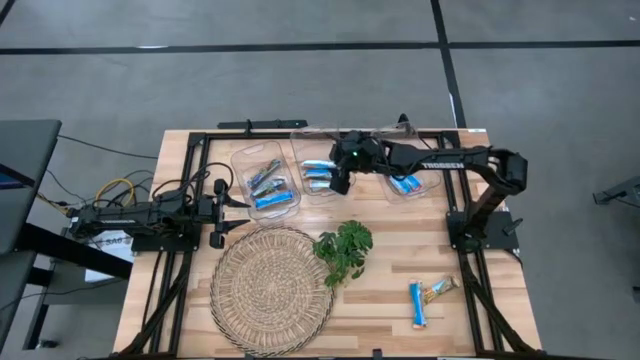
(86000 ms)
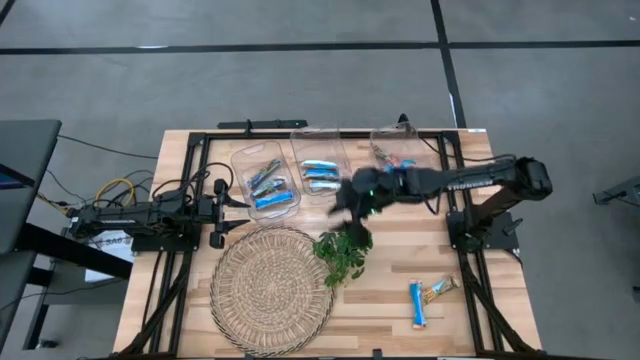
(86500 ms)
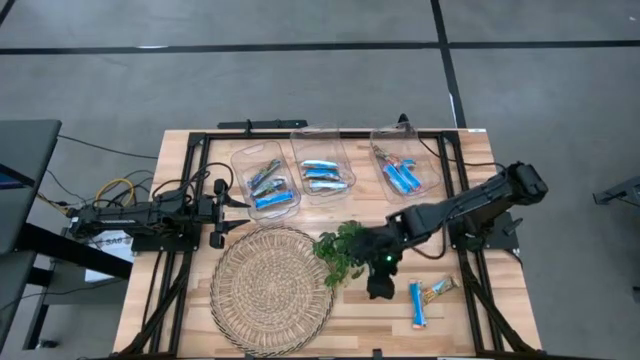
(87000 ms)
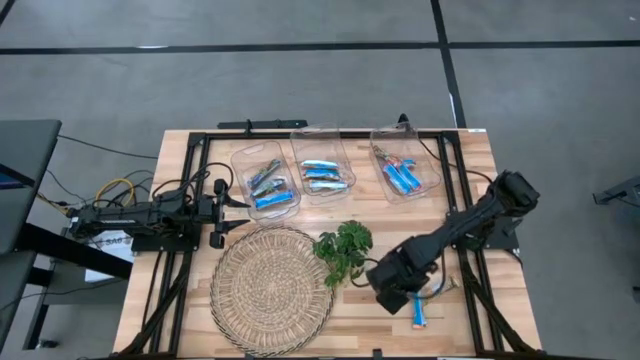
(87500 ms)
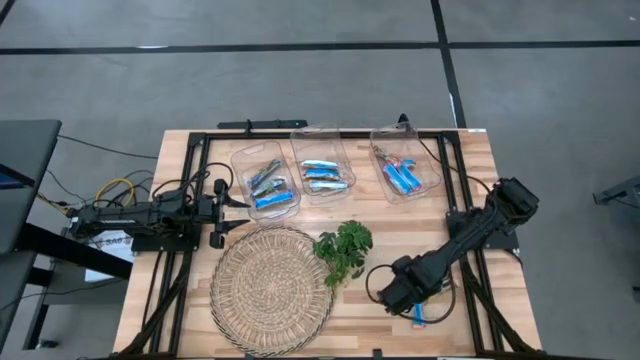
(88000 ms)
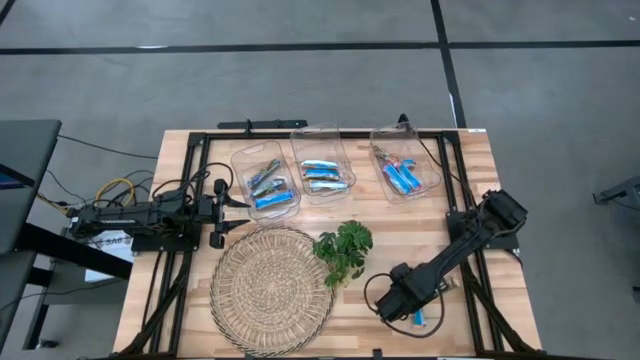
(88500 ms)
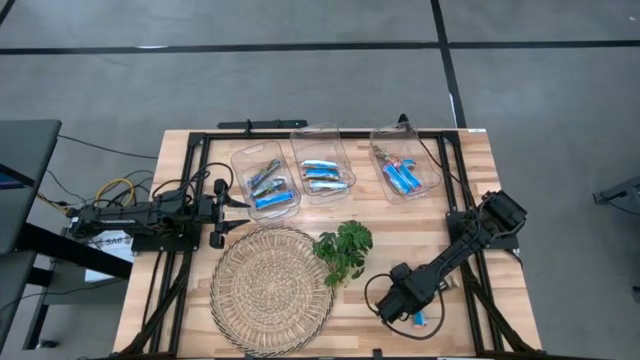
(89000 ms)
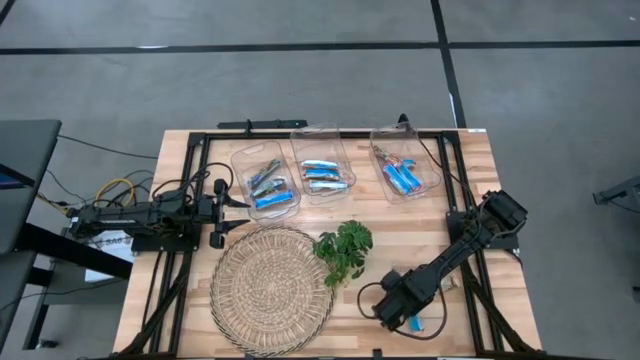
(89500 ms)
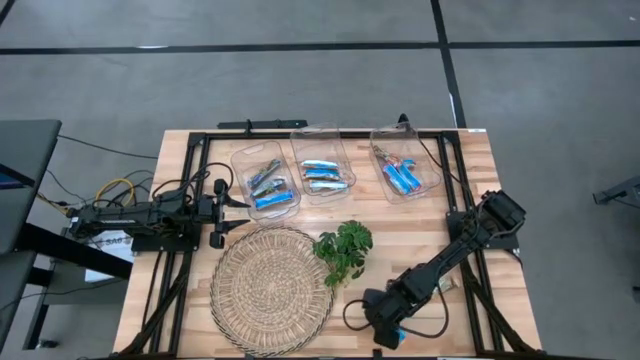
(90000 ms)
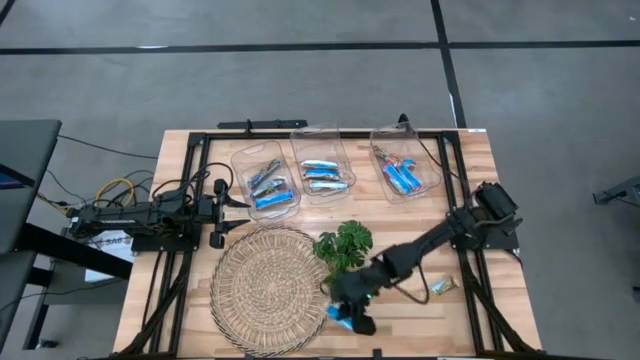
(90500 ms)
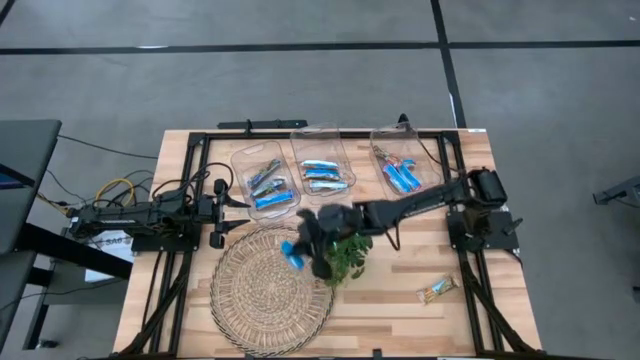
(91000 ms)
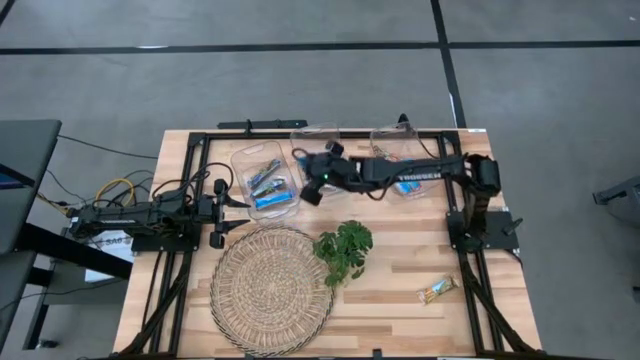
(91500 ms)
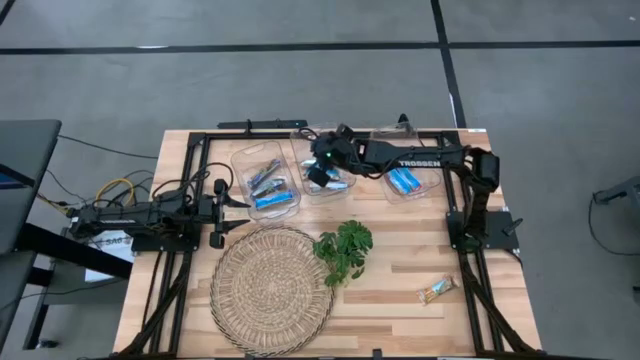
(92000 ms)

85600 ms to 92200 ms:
Task: Pick and place Granola Bars by type
Put the yellow granola bar into the middle transparent bin

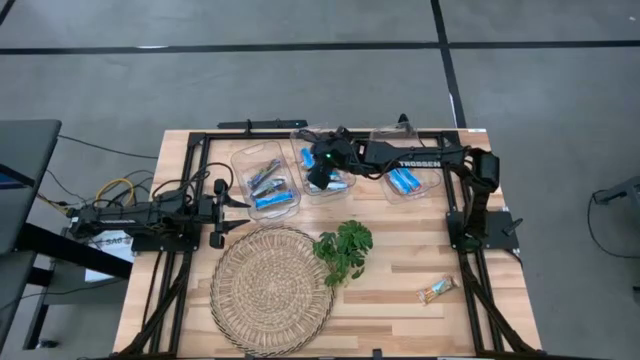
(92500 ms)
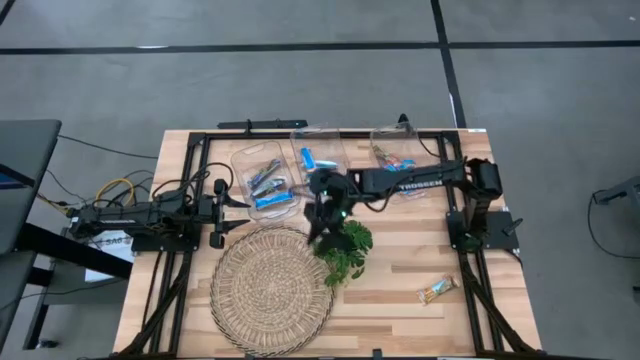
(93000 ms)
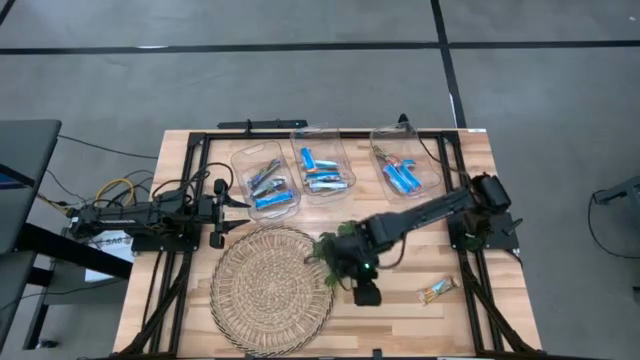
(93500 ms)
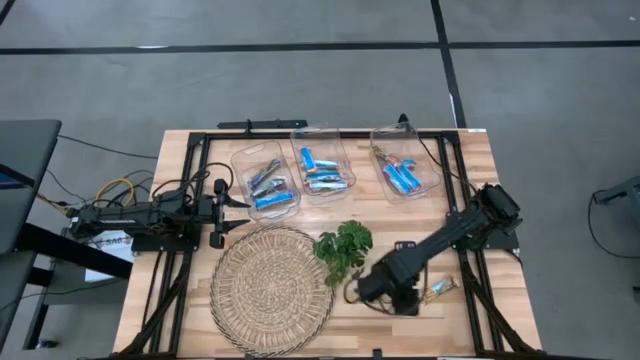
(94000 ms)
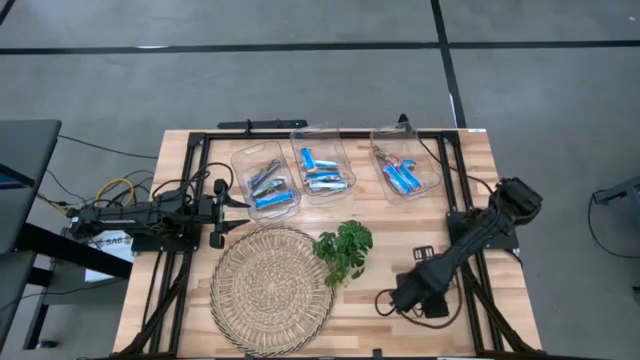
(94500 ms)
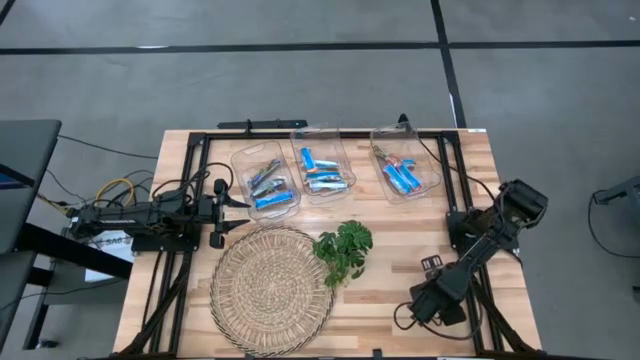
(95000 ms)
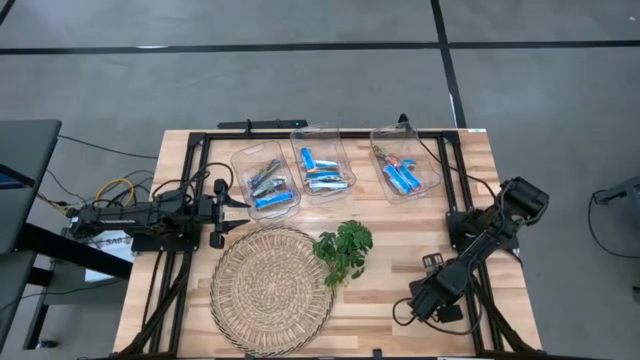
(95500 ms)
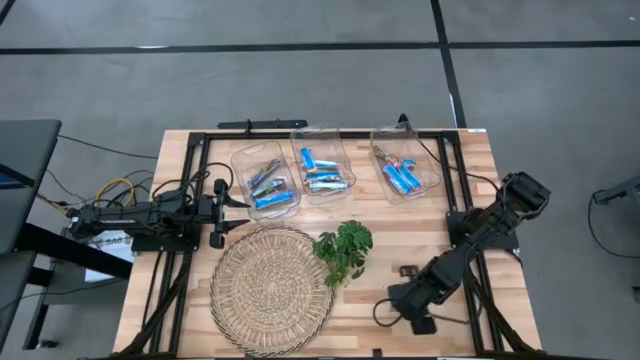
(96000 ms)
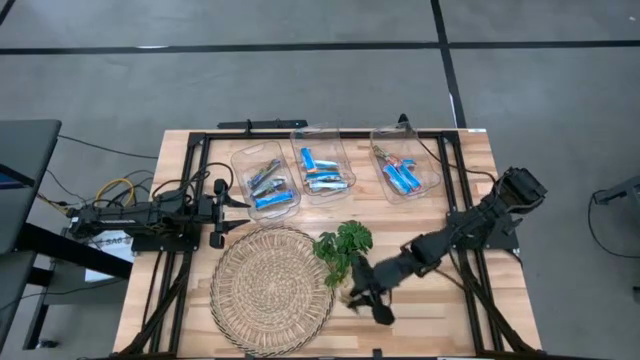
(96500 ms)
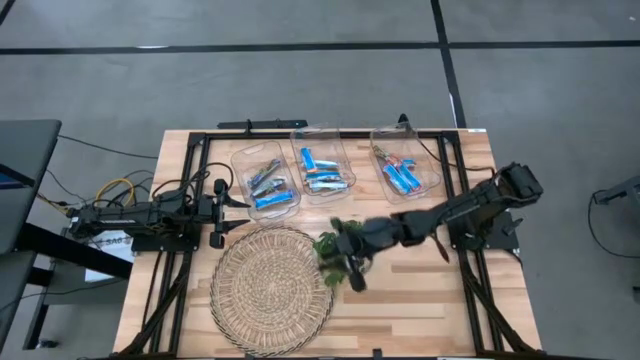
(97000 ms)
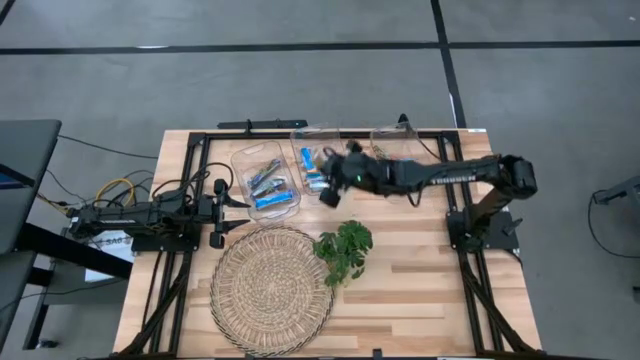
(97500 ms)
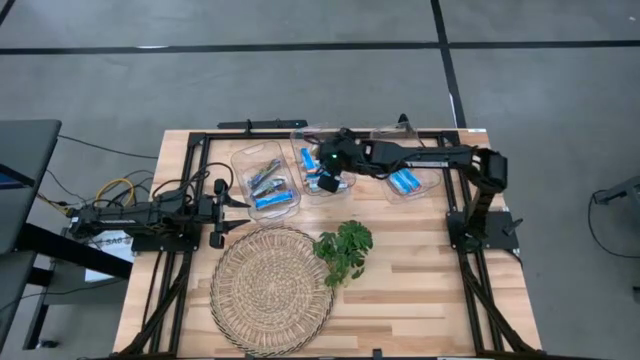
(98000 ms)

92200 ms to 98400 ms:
Put the yellow granola bar into the middle transparent bin

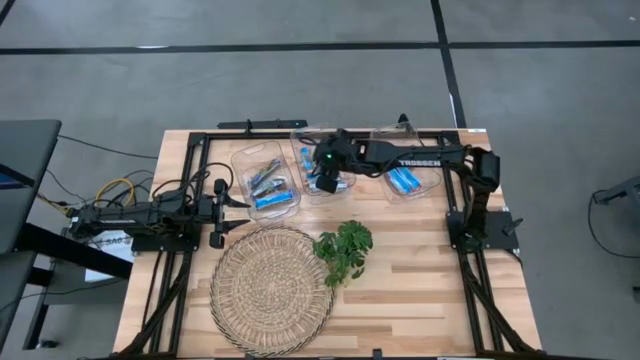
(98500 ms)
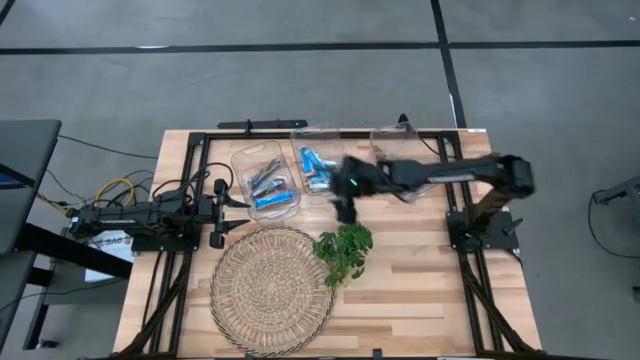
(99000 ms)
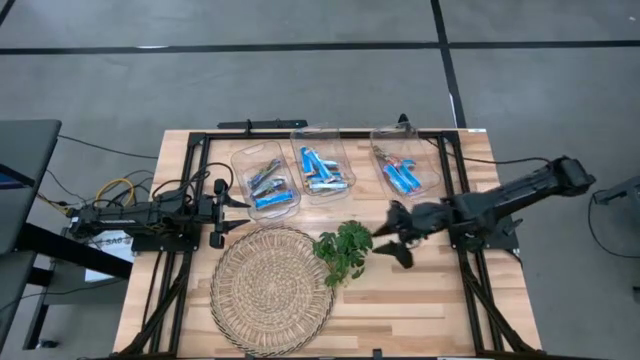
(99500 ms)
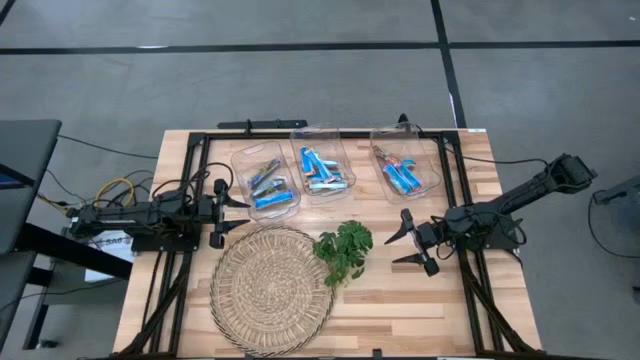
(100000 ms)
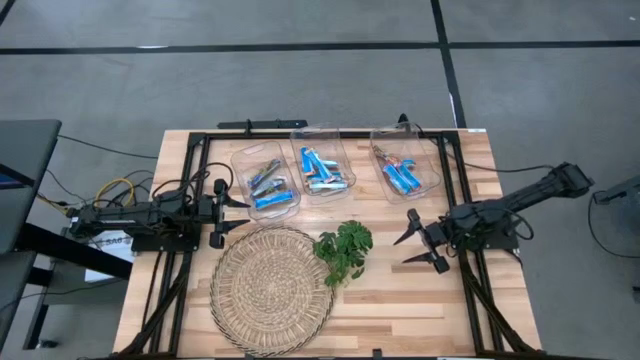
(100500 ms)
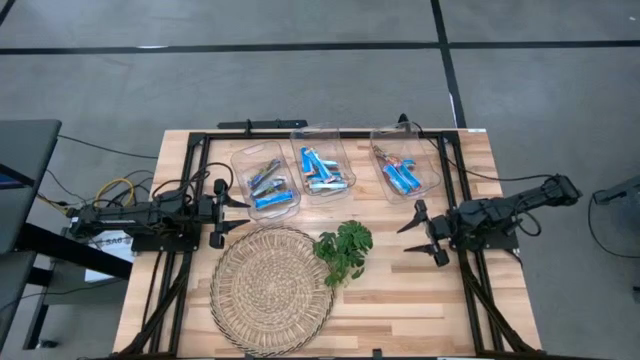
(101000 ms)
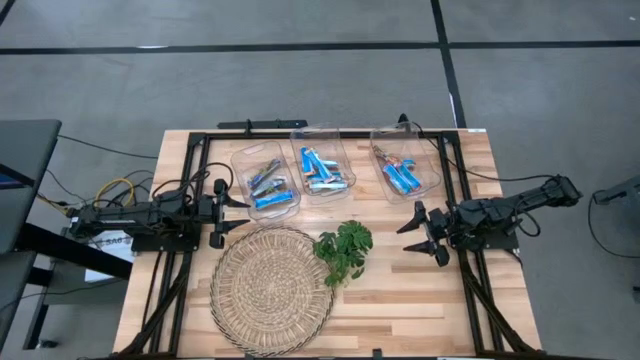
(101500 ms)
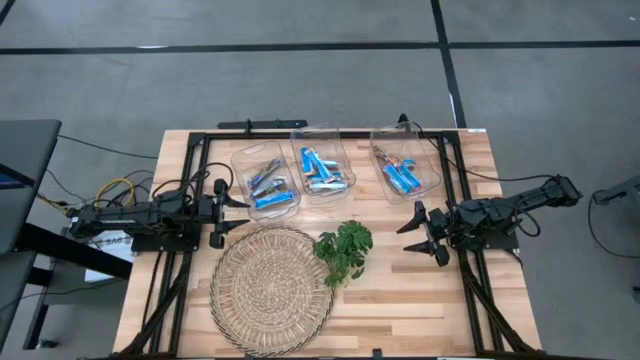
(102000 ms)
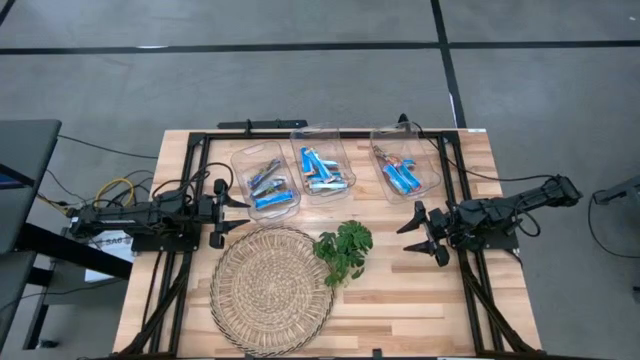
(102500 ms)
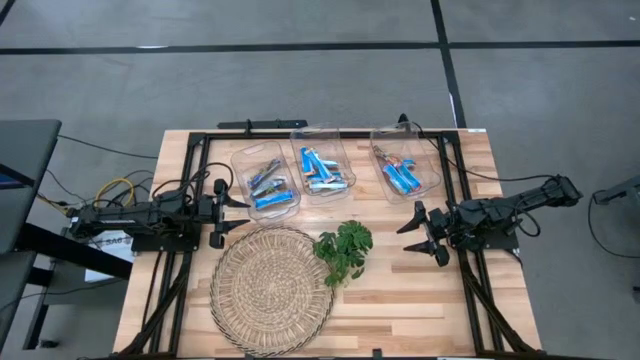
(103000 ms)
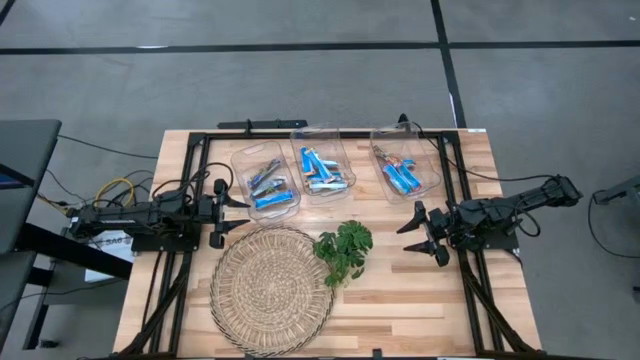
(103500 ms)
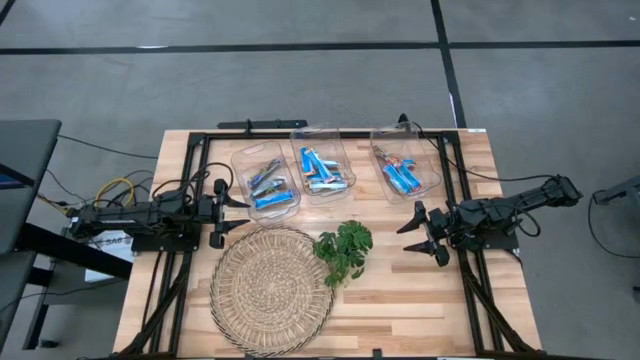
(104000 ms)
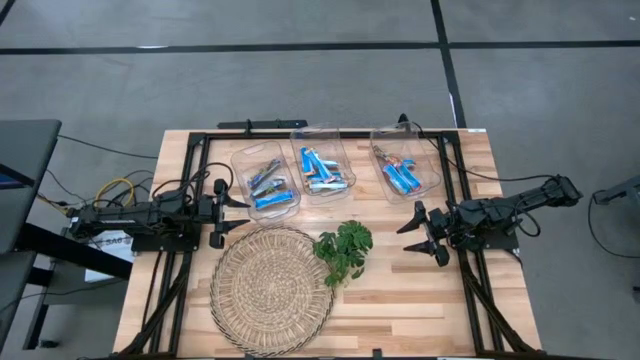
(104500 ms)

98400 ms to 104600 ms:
Return to Home Position

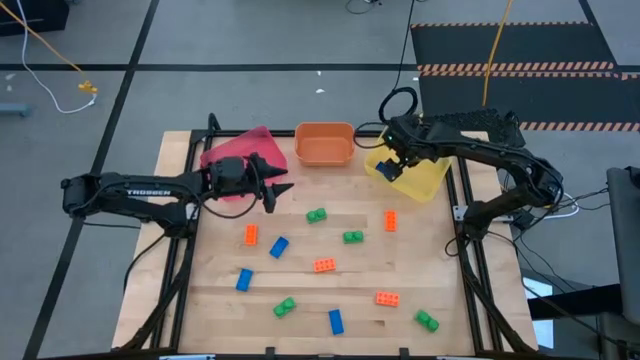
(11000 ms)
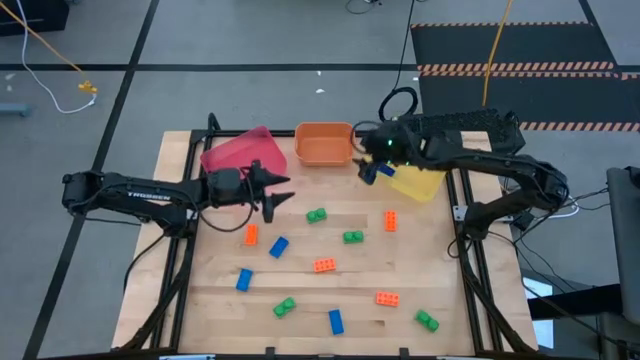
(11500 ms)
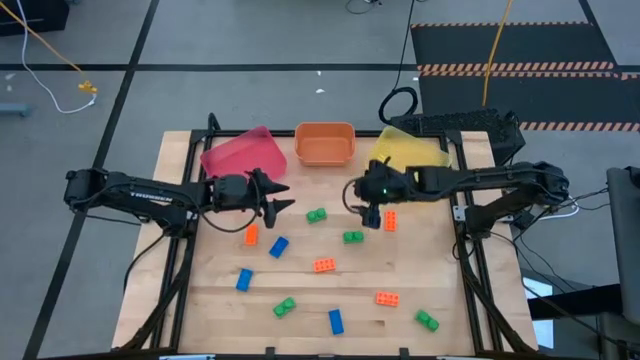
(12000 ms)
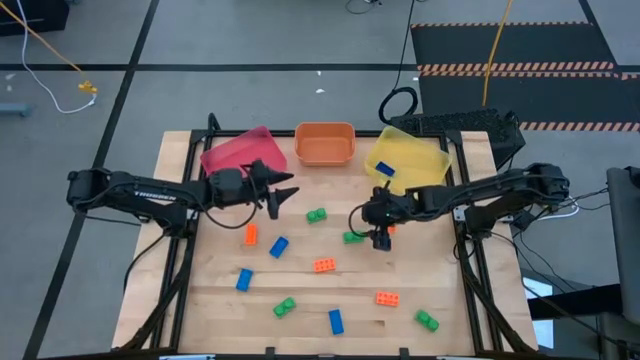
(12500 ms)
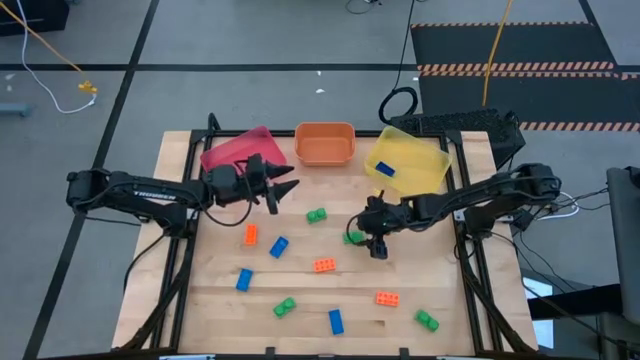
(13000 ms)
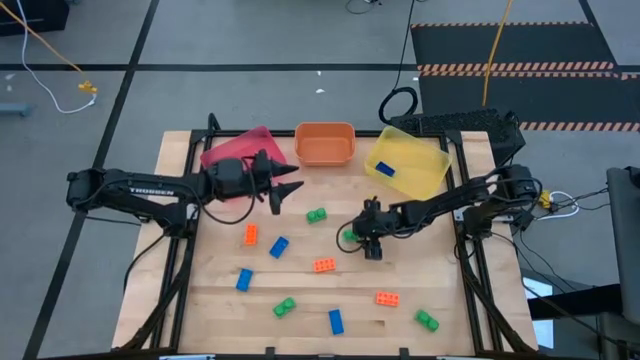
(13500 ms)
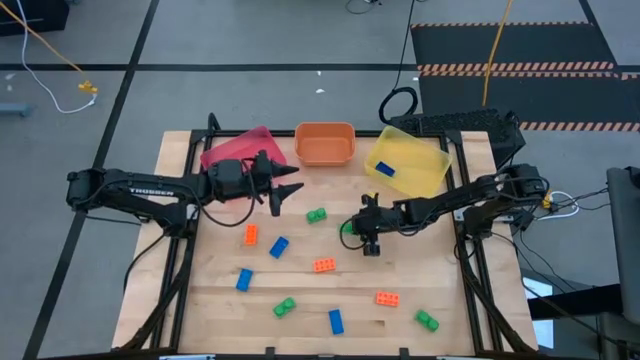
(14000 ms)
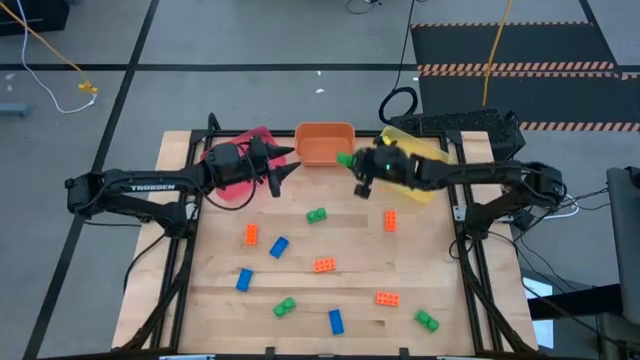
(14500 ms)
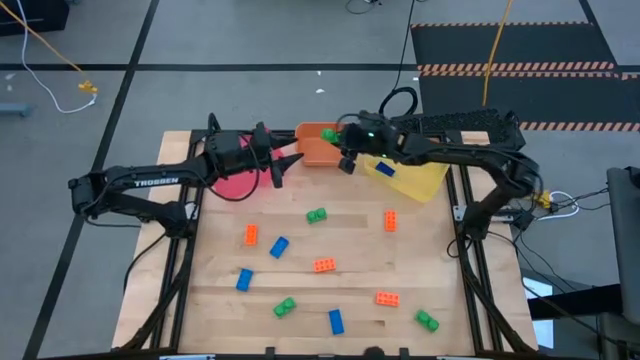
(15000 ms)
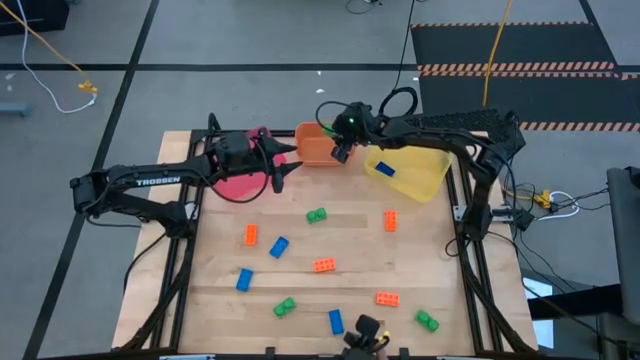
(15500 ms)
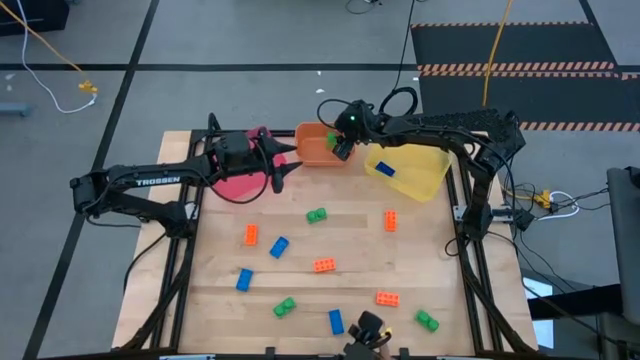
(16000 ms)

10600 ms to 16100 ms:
Task: Sort & place blocks by color
Put the green game piece into the orange bin
